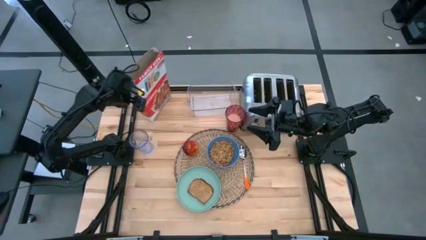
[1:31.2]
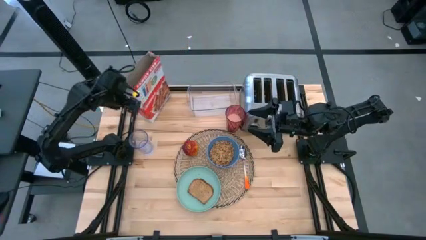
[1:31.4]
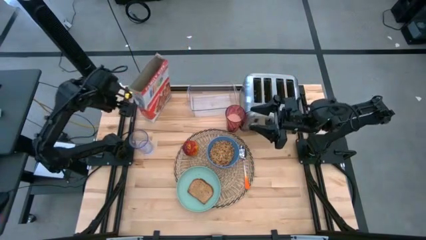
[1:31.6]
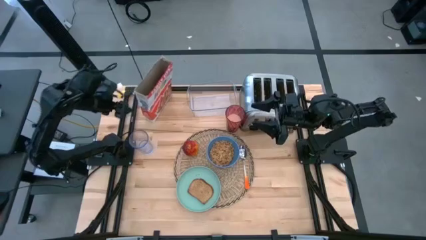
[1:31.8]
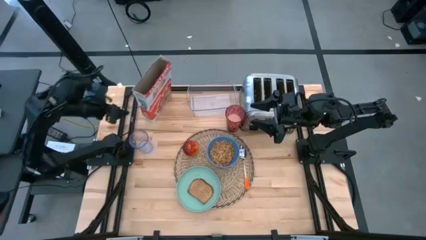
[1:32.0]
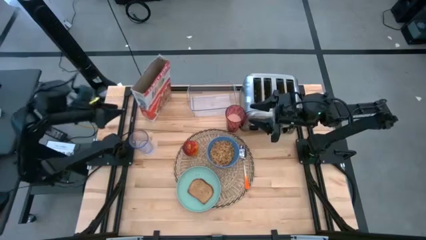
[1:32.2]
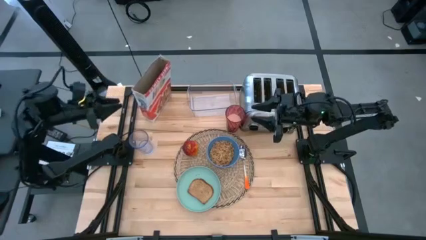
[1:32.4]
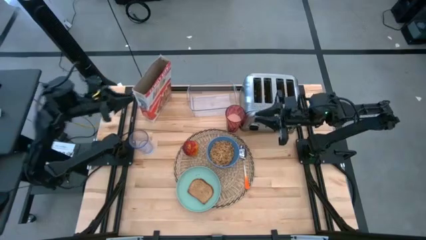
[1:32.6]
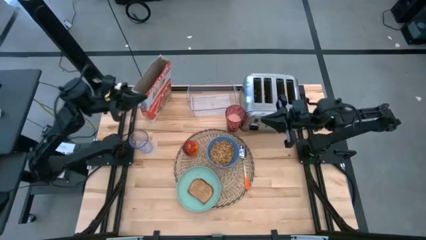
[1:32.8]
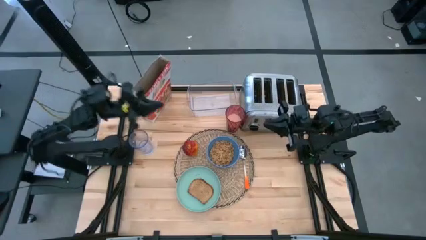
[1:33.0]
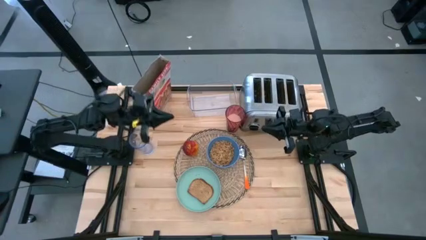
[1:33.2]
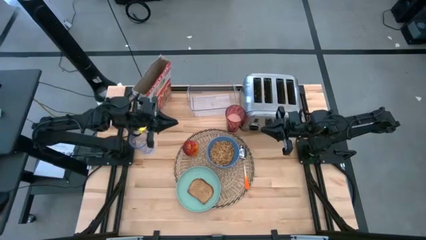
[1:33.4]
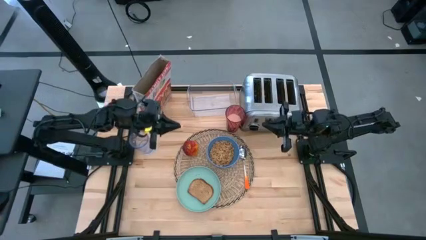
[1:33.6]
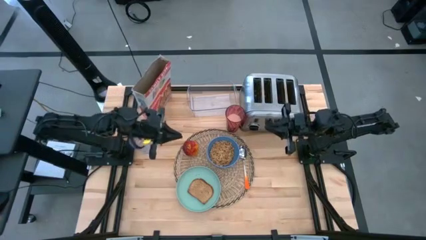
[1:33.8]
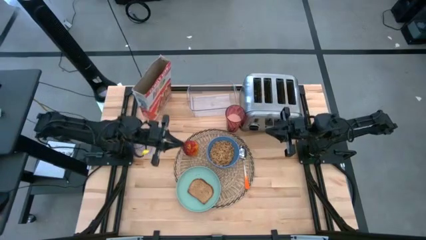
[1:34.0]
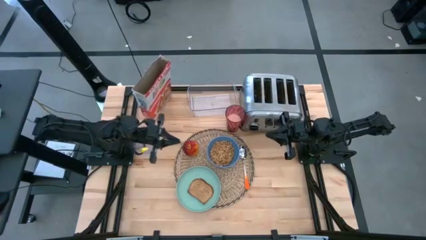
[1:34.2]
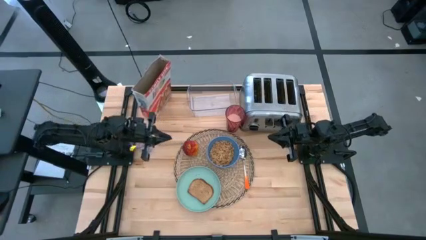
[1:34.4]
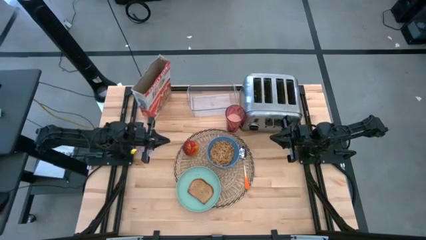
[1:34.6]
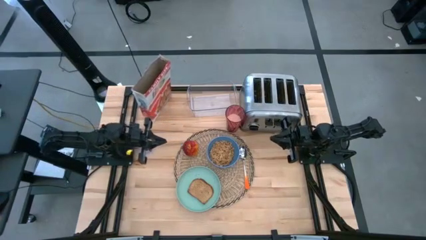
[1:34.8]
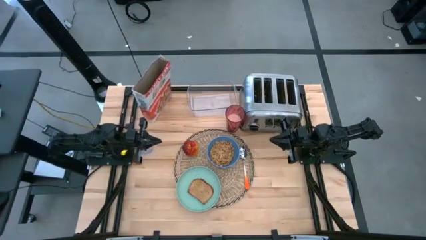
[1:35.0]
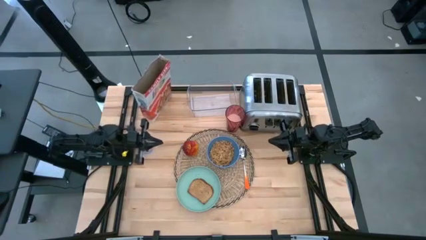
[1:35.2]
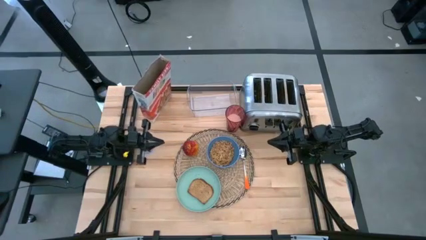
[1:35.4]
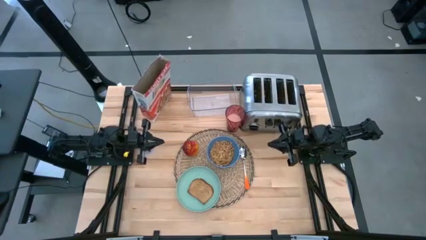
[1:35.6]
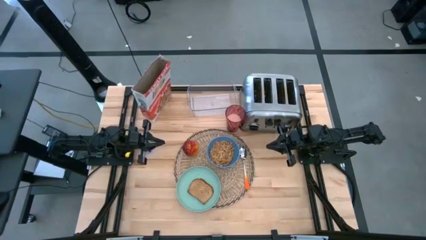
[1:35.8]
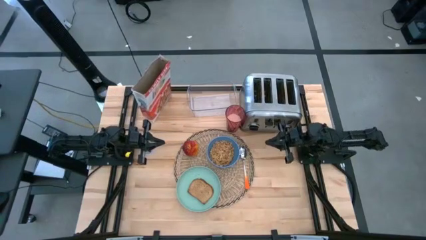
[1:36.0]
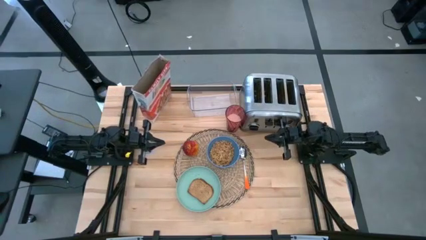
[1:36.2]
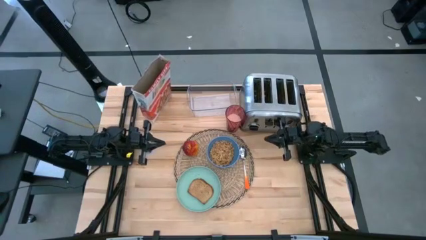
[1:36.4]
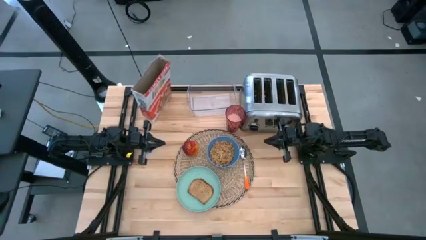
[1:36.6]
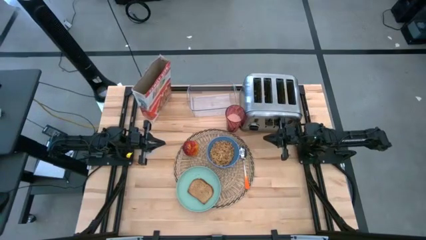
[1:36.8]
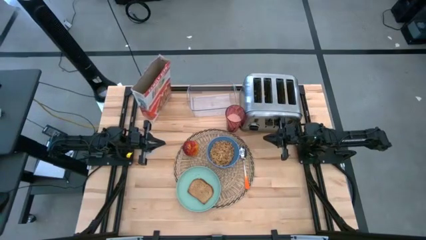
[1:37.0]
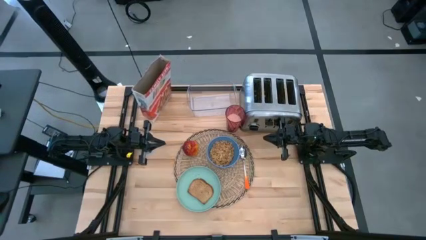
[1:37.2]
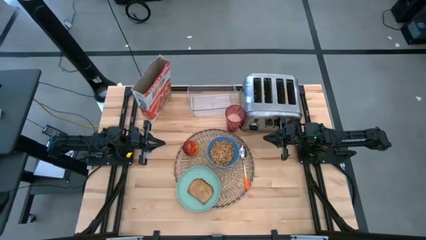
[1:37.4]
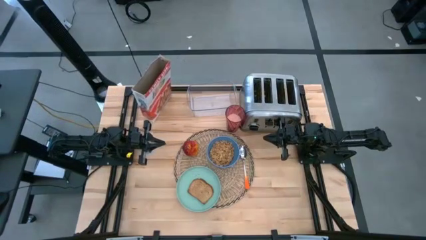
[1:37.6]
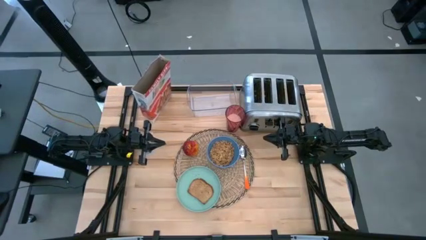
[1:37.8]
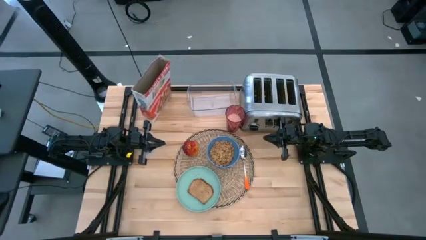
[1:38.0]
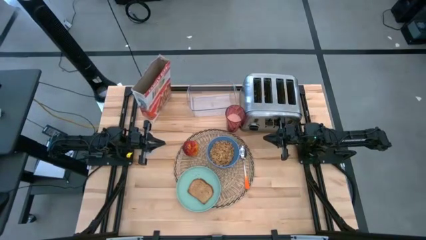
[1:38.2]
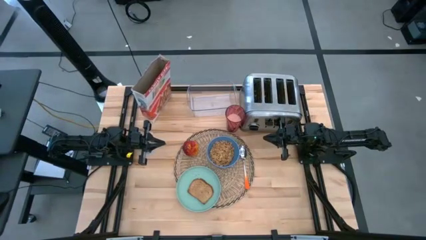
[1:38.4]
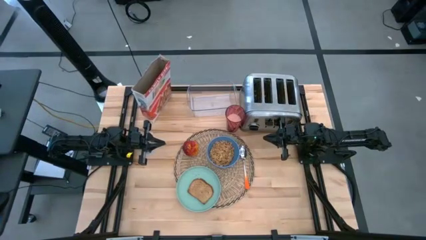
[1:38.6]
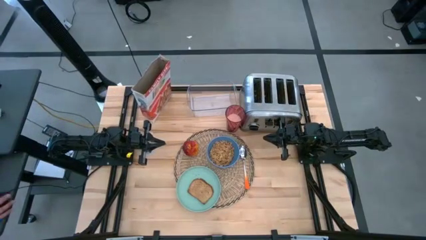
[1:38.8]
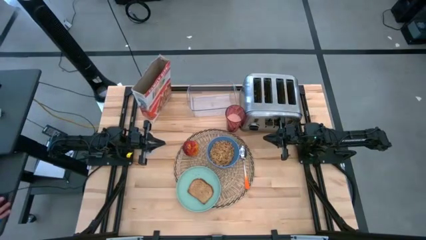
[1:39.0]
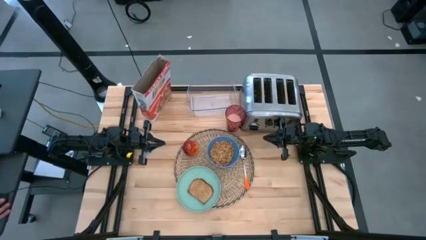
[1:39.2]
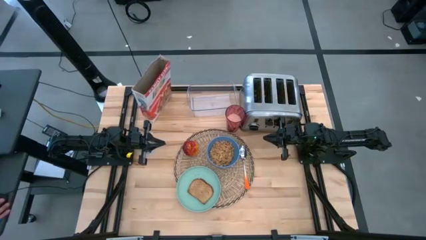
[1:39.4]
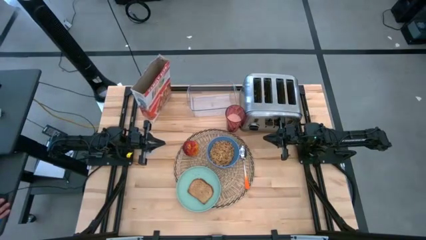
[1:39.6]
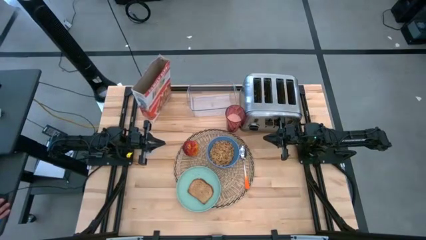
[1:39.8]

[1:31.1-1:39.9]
Task: Arrange a breakfast setting
Return to Home Position

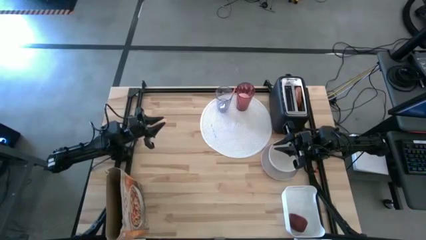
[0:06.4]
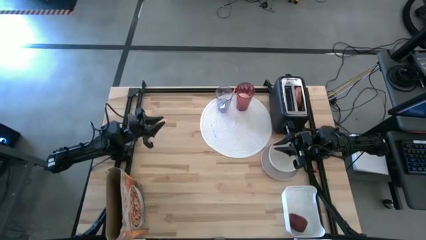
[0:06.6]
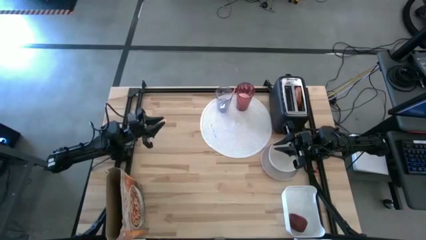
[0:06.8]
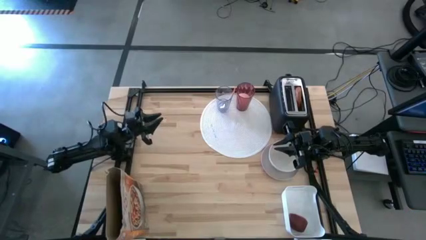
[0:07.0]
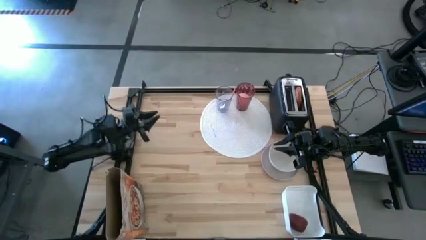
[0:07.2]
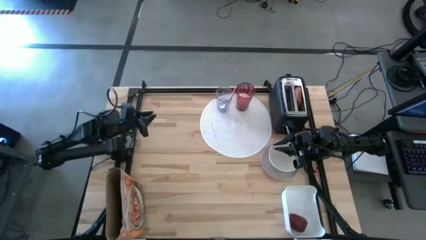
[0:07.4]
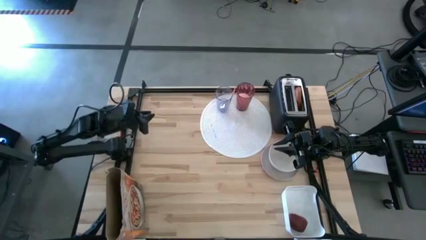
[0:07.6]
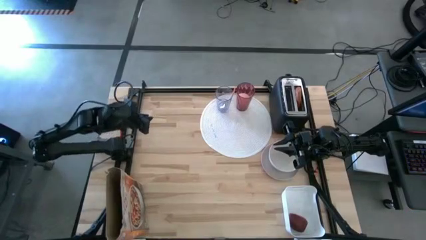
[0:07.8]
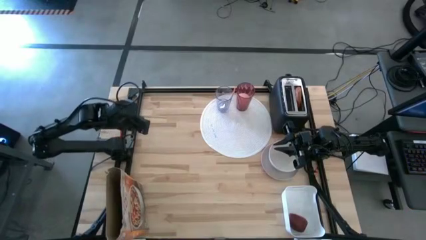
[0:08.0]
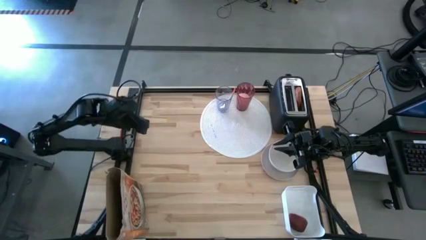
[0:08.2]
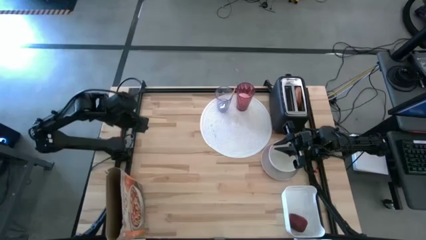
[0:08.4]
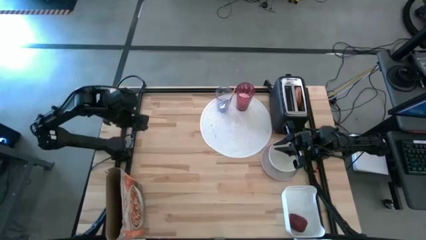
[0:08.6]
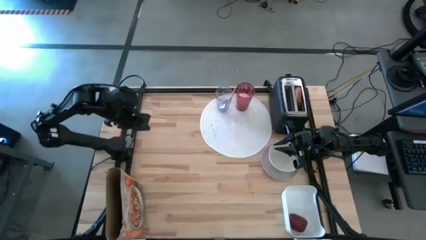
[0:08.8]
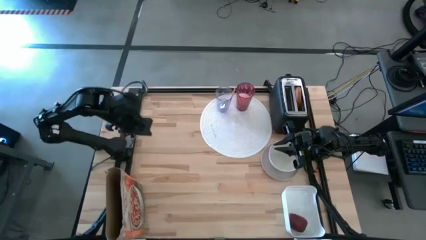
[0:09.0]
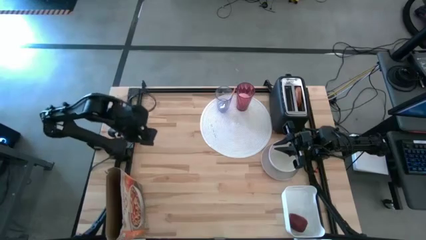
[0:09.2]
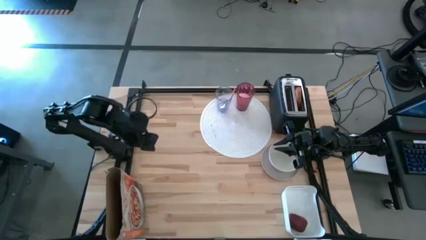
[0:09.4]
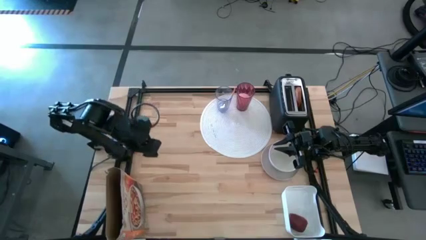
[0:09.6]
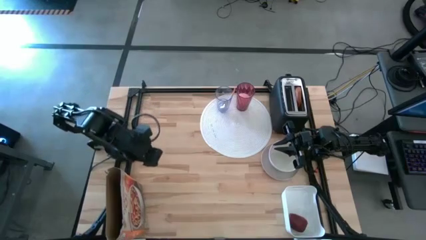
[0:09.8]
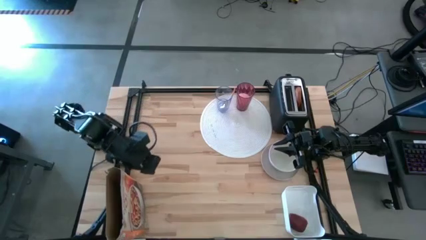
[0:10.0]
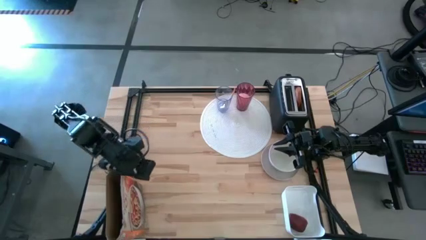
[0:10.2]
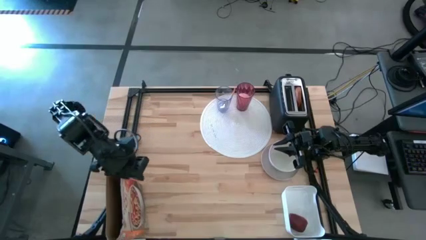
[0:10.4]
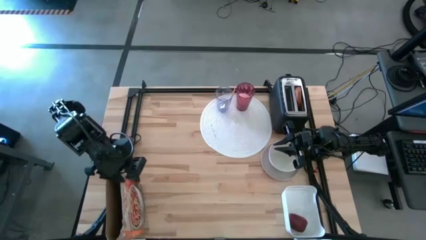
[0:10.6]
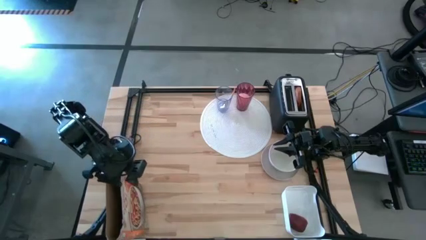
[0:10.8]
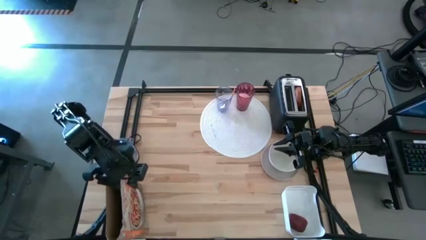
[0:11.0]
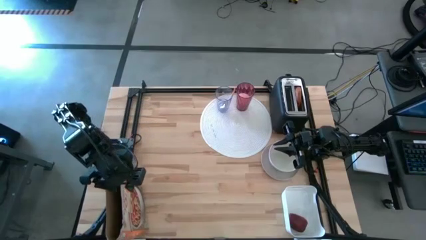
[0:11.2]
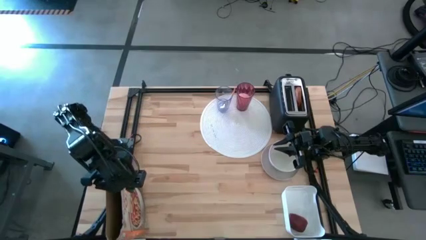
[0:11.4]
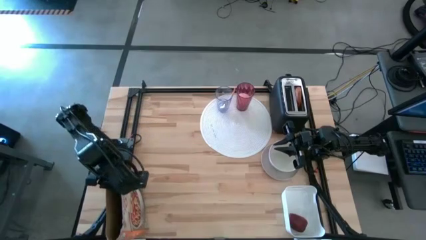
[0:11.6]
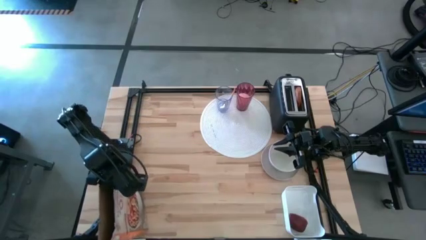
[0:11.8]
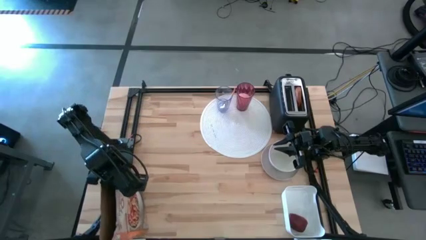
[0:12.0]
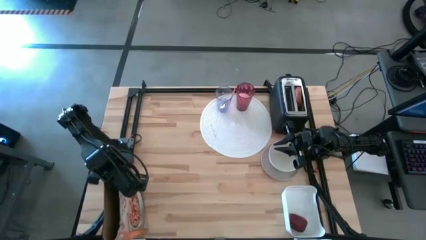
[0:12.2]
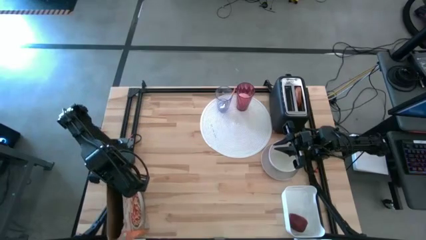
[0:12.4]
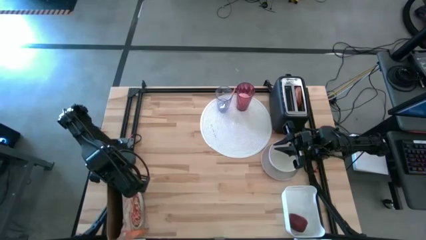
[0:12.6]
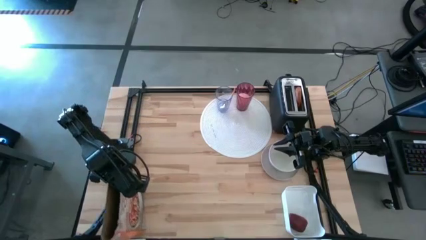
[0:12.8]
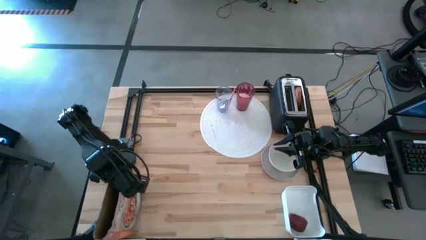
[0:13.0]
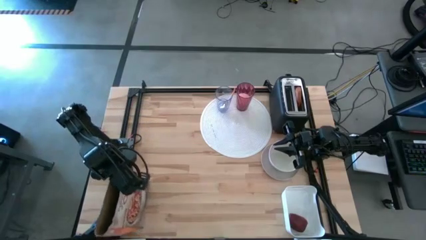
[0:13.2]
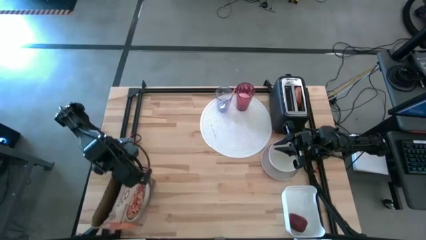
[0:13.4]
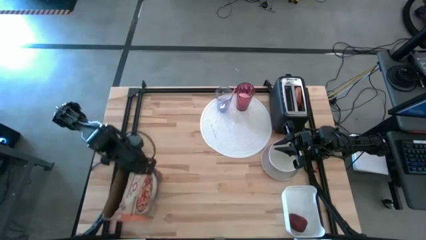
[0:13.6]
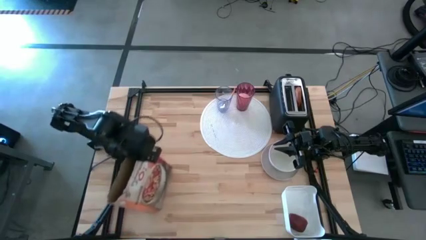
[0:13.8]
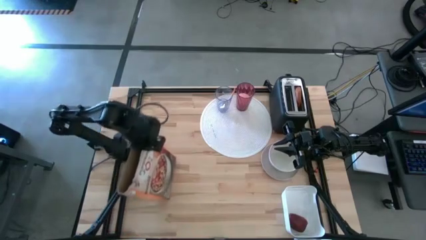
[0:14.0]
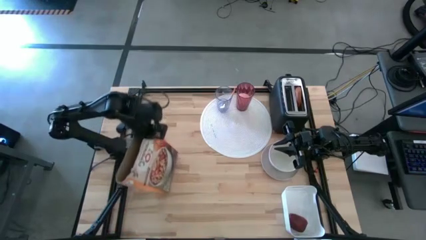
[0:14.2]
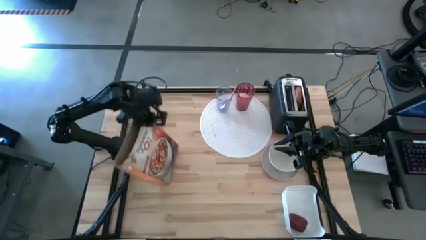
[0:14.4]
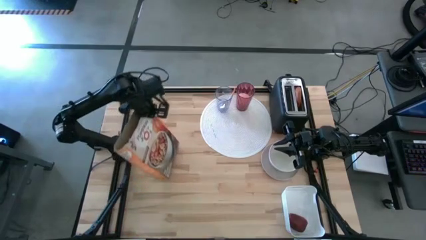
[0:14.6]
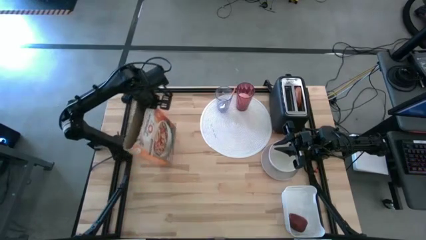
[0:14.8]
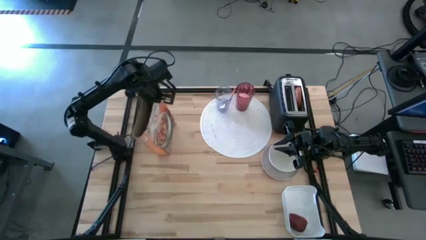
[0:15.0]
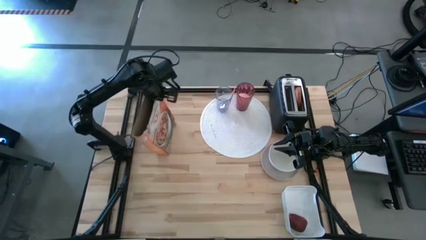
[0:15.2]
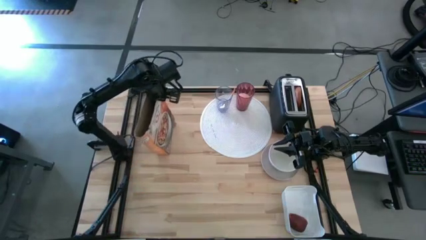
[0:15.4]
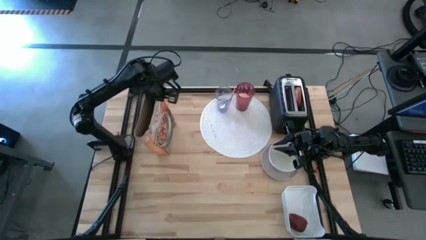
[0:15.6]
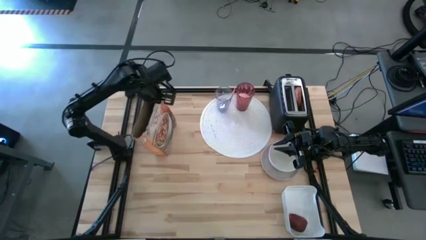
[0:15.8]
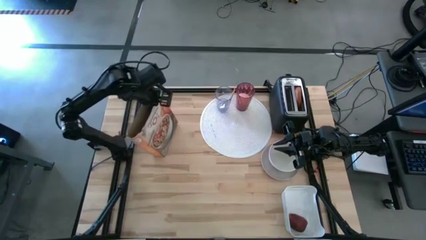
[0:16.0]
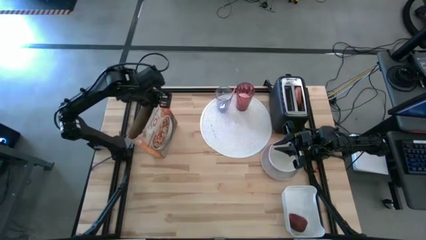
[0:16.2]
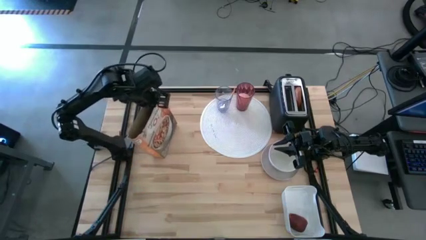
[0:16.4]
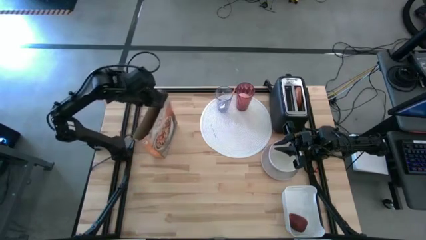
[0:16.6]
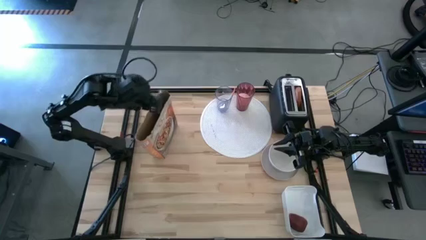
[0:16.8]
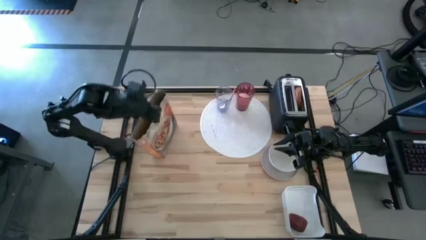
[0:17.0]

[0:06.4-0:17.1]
Task: Arrange a breakfast setting
Move the orange cereal box to the top left of the table
